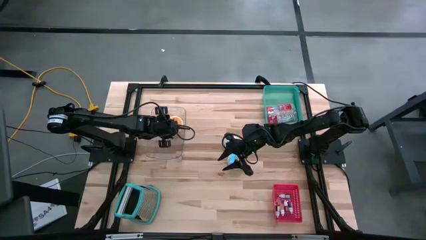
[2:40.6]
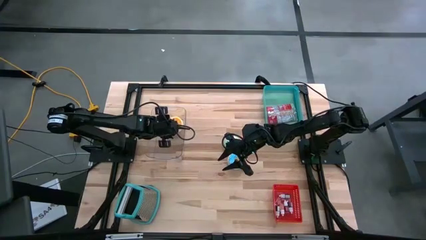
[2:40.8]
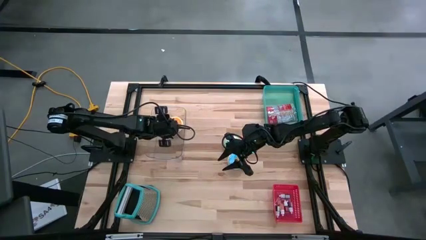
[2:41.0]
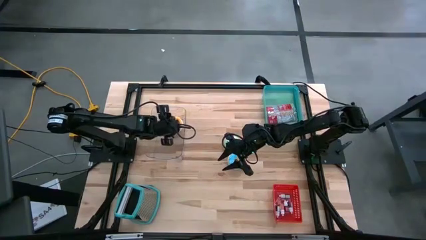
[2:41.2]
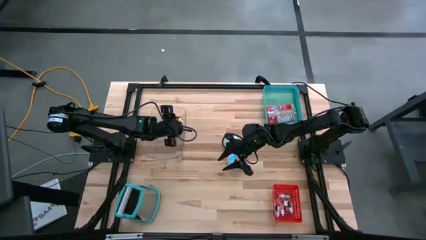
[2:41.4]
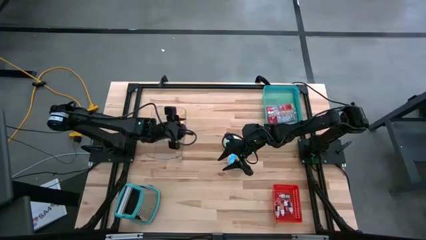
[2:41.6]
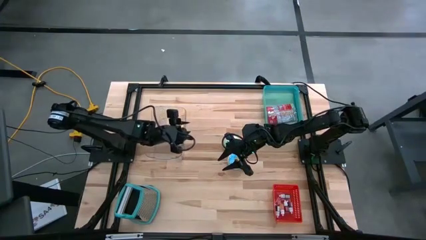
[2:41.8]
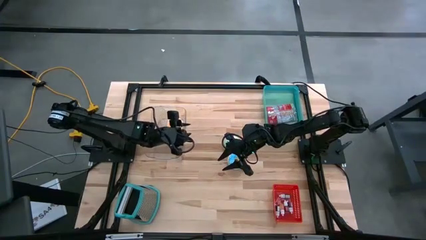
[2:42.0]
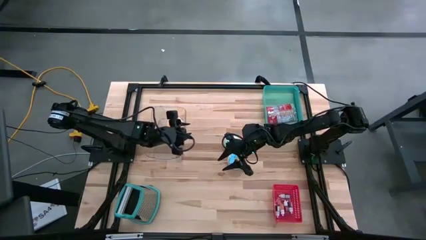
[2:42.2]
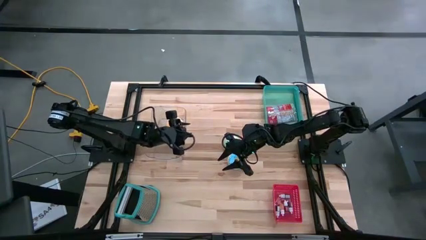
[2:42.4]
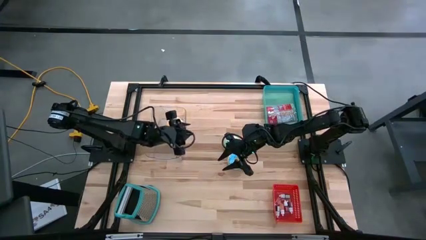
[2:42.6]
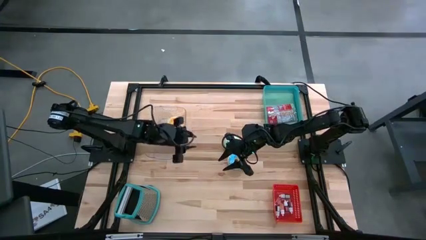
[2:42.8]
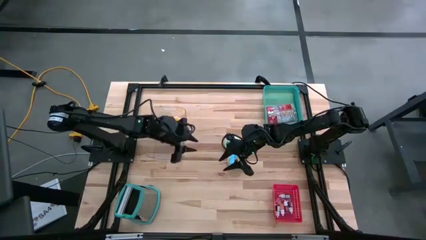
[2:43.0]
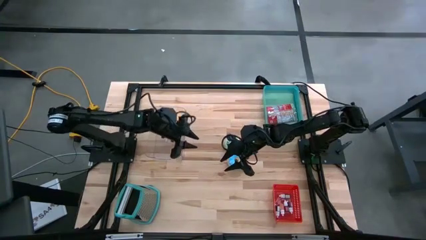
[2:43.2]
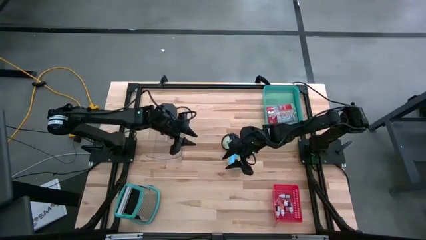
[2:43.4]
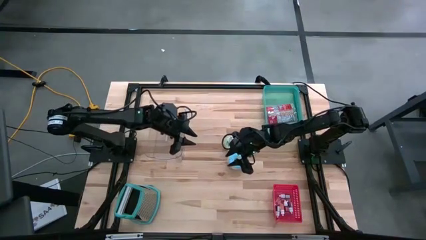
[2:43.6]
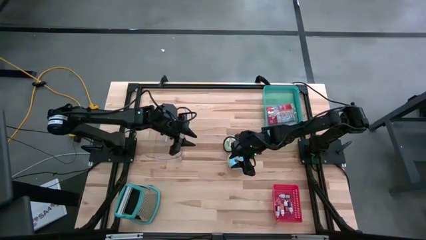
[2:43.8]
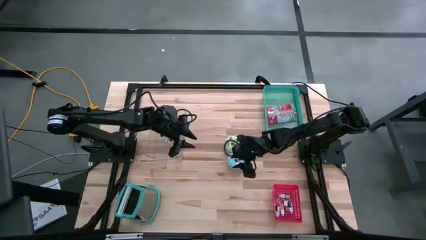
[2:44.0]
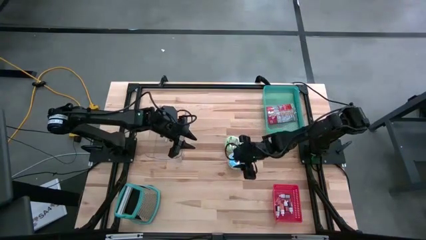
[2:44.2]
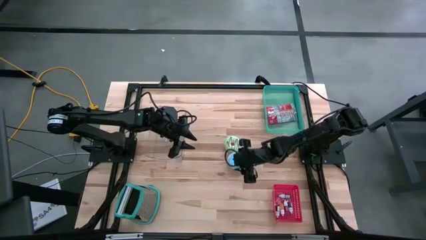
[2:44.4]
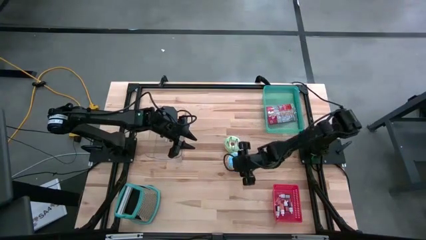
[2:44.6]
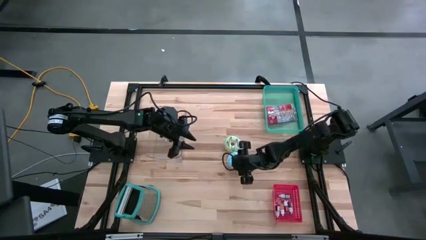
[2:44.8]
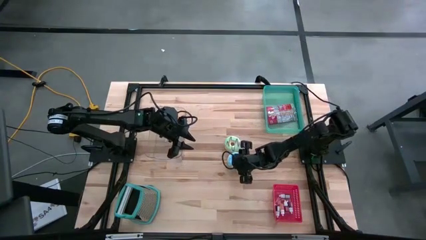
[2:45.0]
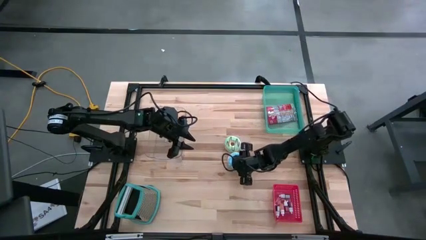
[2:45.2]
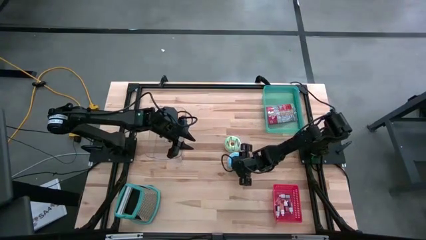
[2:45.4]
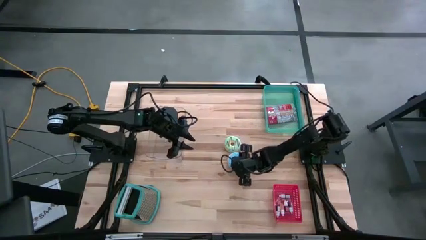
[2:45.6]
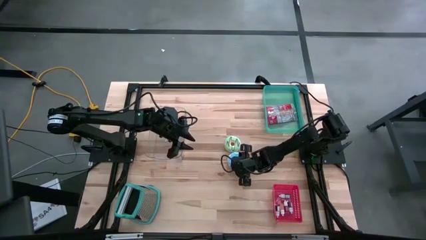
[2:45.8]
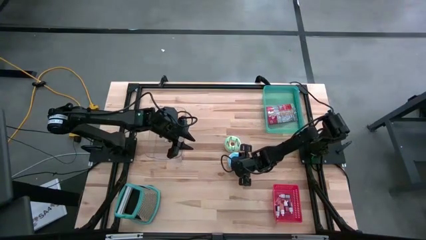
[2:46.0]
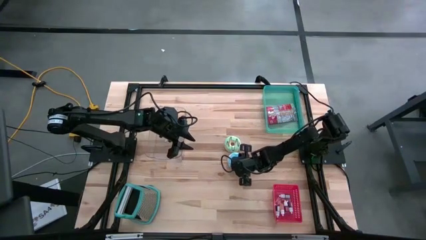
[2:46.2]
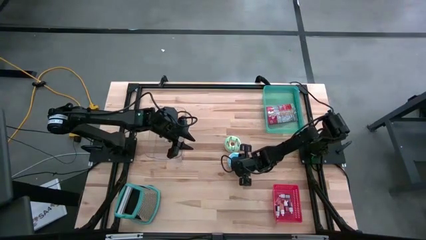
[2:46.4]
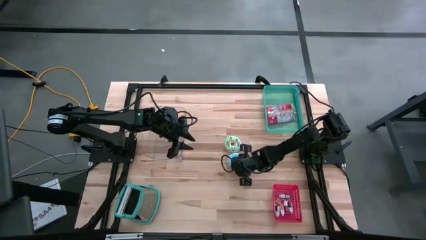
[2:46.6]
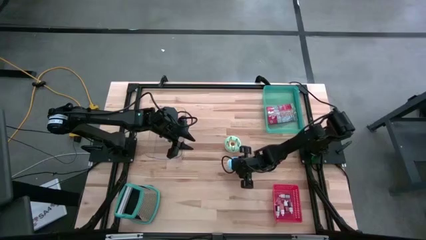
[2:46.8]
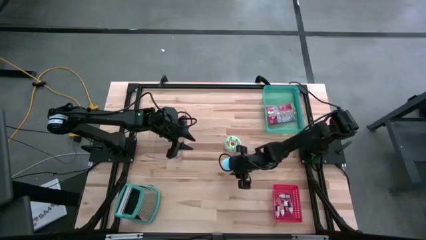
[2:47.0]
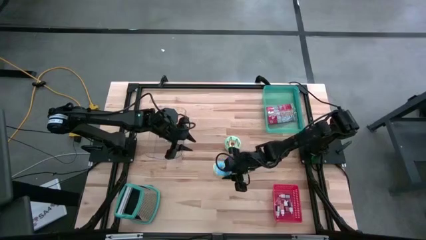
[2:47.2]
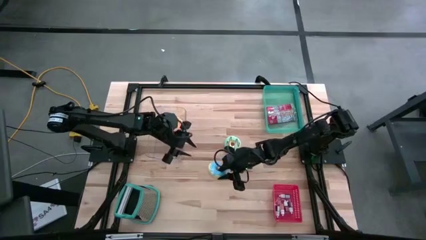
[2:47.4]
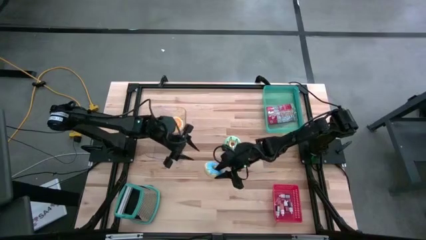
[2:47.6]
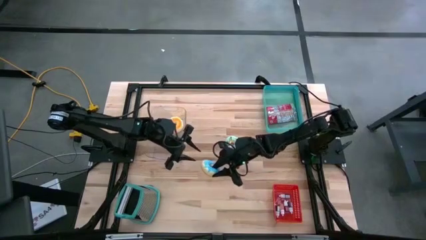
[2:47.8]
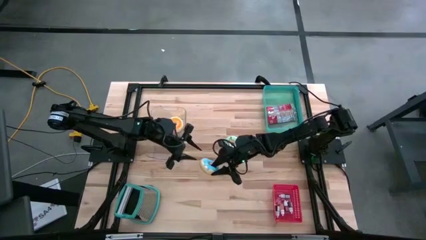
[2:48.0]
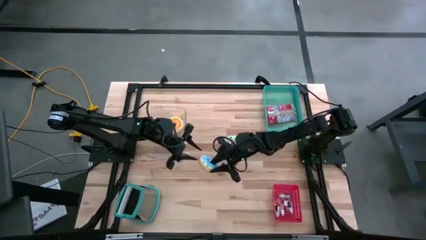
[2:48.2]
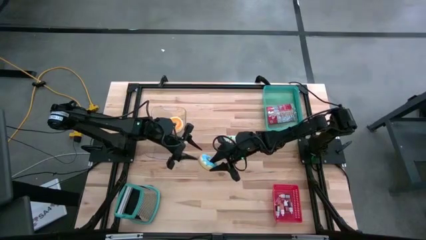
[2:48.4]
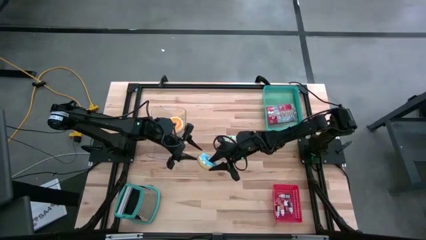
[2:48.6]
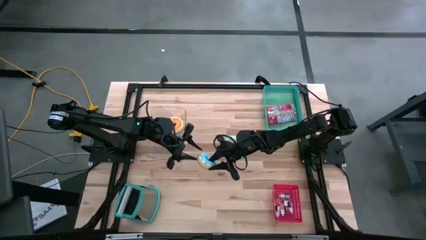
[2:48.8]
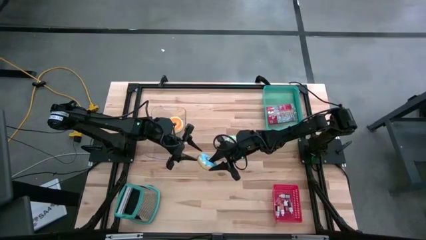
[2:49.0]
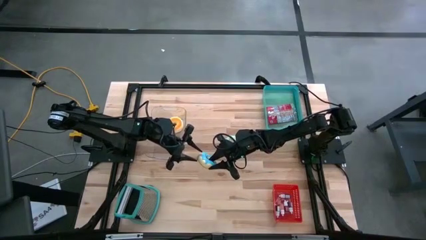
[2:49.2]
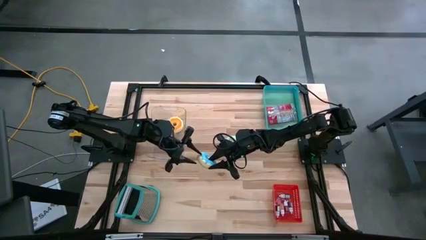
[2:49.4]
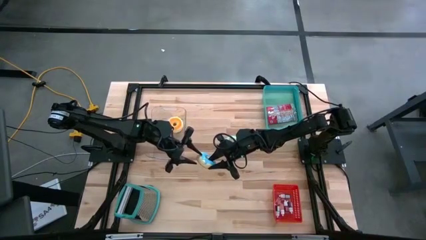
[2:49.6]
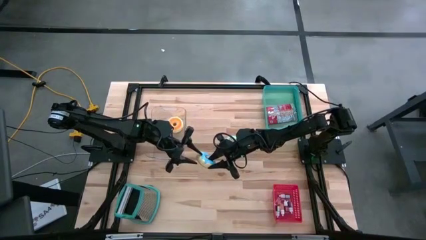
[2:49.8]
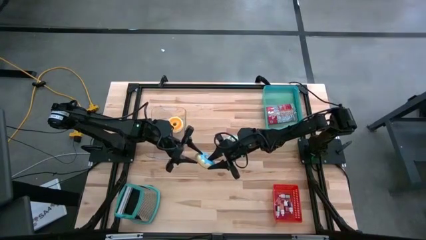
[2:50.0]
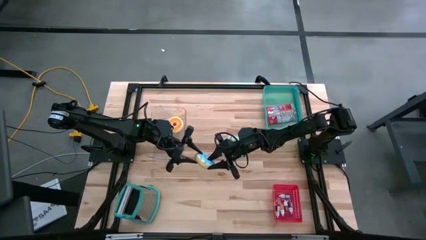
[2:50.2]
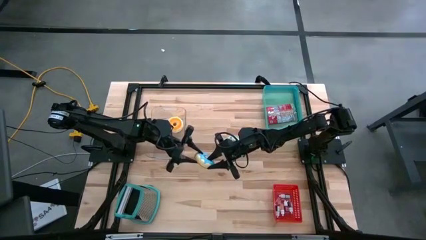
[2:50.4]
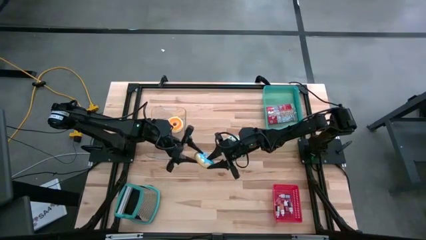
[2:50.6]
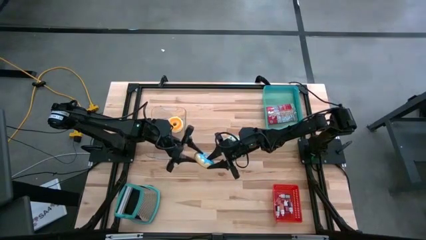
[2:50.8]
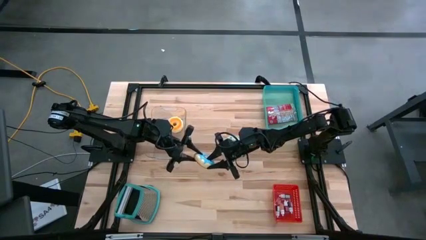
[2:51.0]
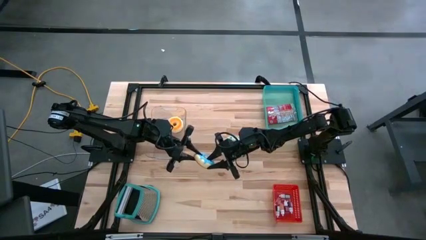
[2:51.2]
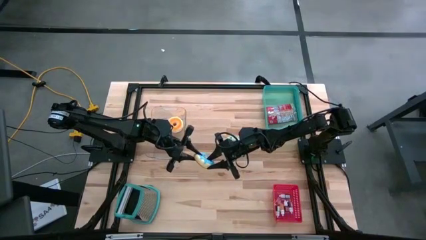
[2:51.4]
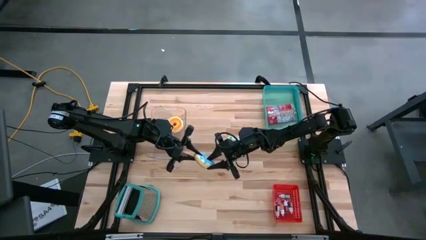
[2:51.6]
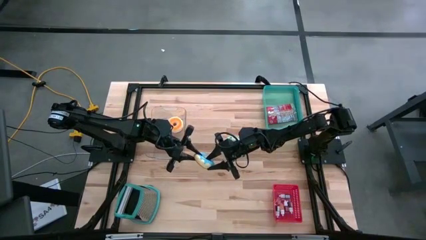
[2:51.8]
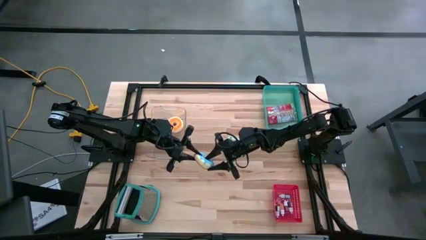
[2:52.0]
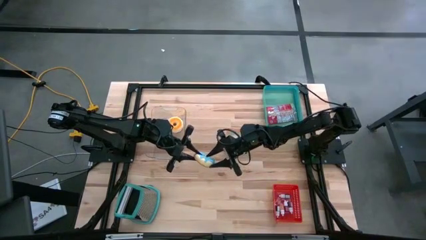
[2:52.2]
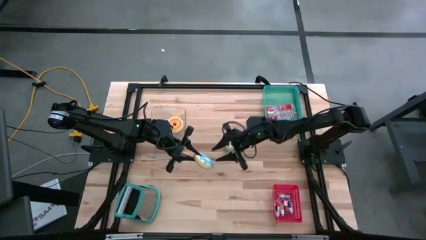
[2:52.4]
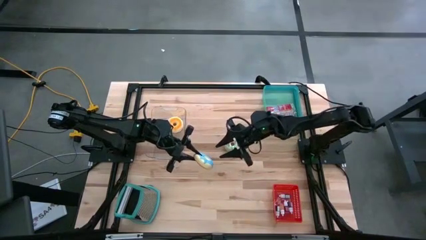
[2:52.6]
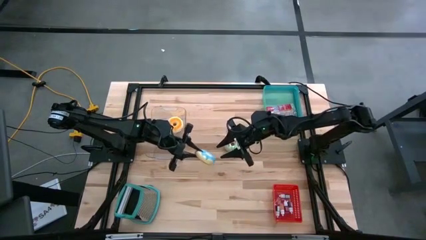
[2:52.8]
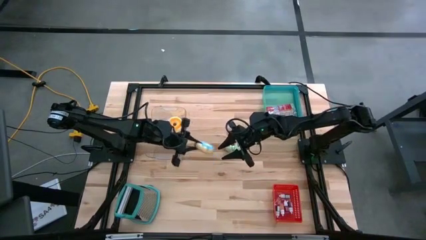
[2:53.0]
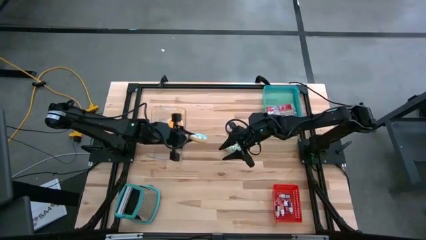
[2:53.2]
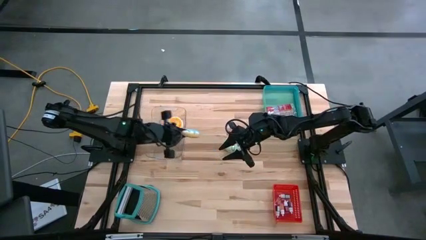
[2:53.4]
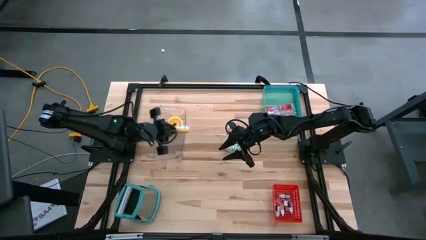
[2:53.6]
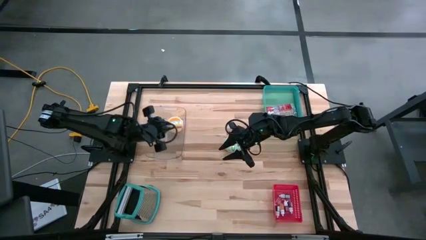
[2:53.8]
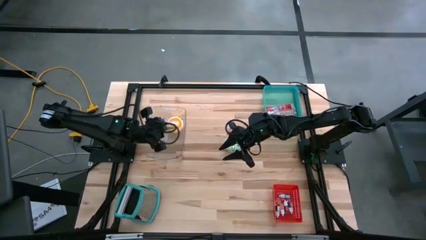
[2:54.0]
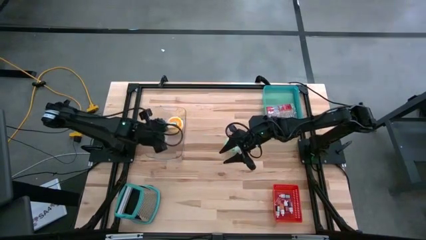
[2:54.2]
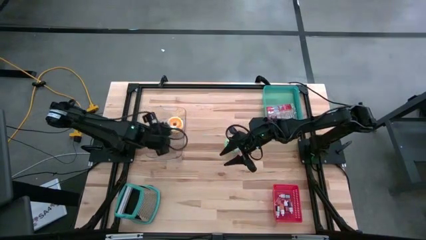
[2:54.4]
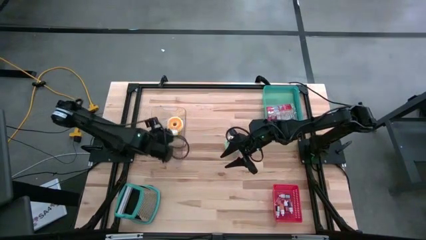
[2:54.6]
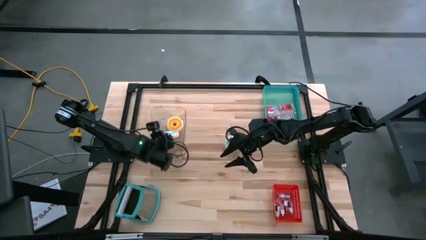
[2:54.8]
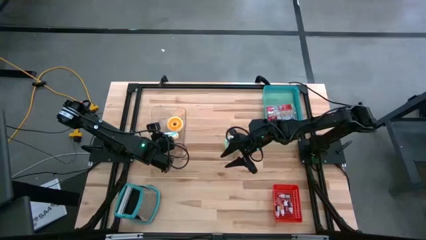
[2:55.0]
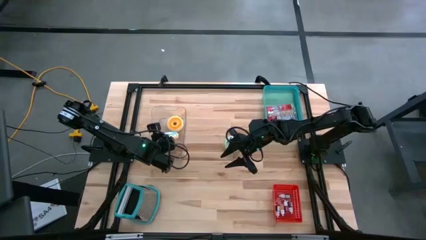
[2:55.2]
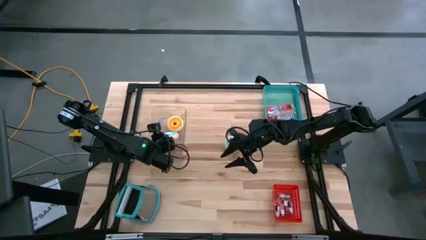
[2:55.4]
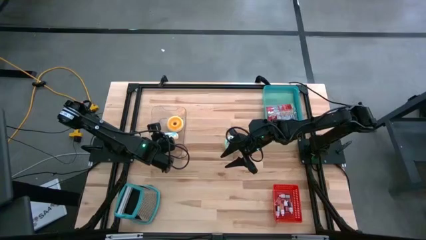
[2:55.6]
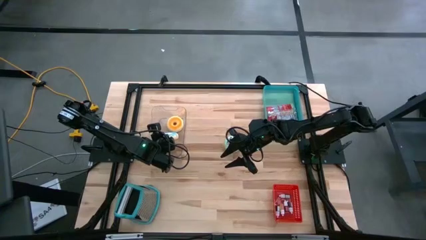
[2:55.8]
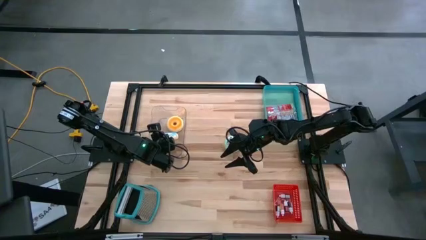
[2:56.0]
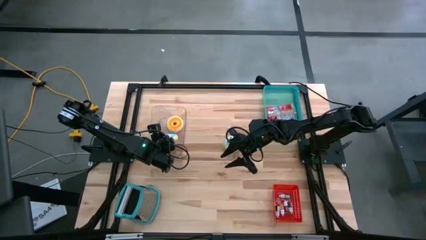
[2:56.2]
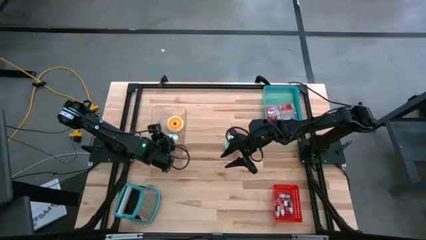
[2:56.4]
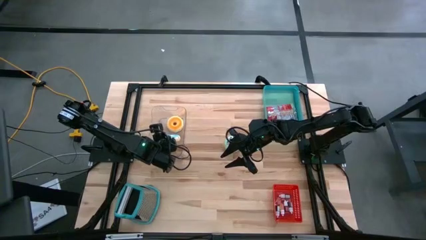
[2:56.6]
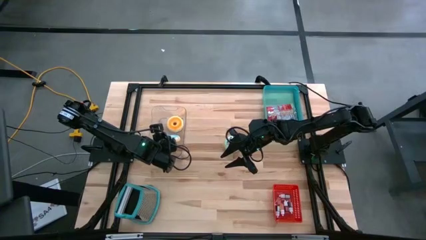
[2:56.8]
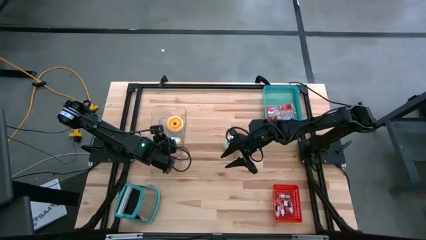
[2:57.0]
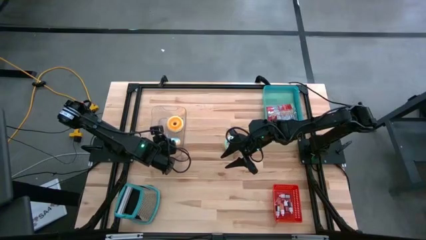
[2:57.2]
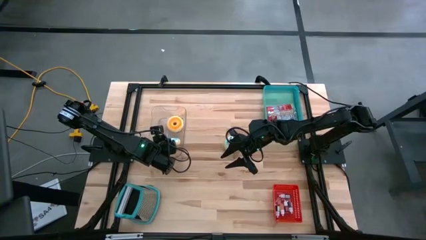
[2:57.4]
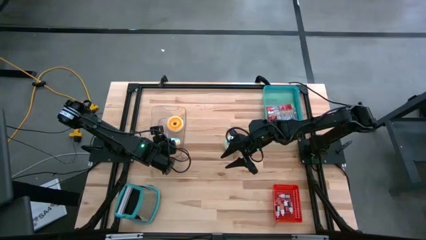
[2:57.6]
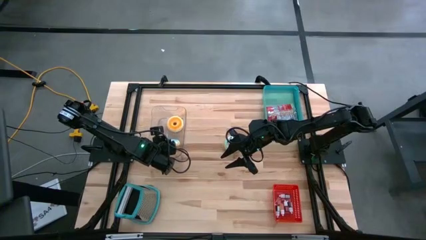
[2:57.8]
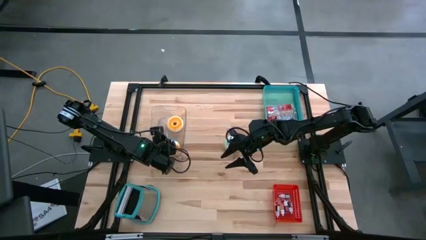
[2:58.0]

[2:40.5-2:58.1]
Put the blue doughnut into the transparent bin
